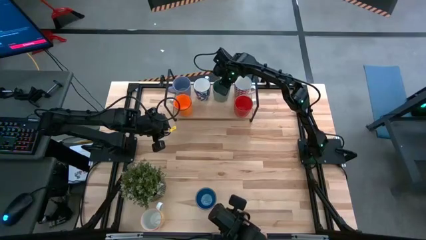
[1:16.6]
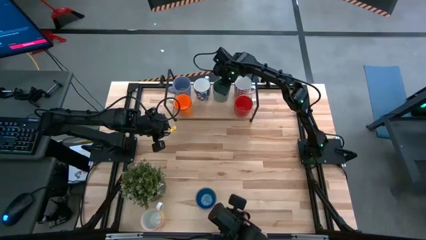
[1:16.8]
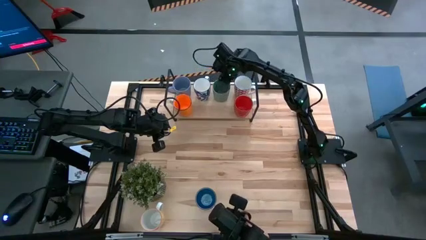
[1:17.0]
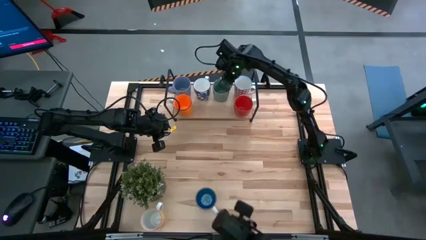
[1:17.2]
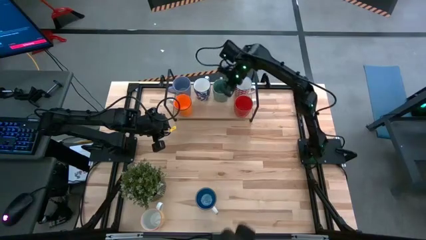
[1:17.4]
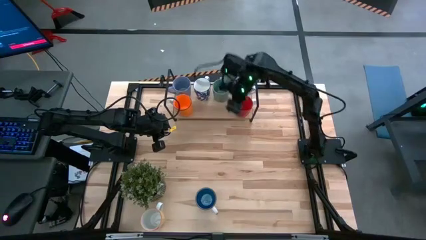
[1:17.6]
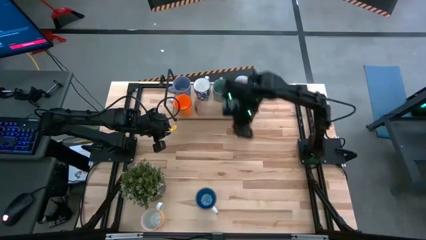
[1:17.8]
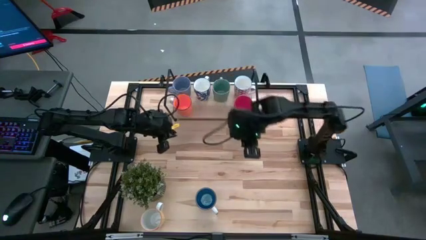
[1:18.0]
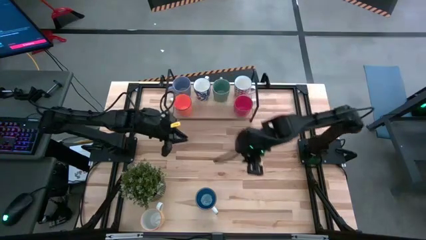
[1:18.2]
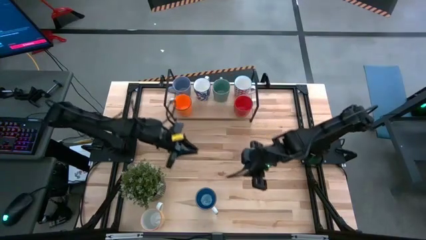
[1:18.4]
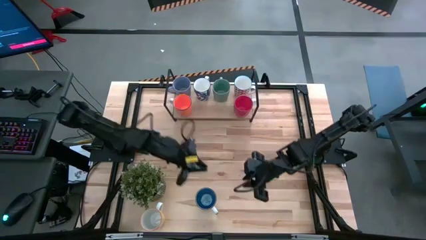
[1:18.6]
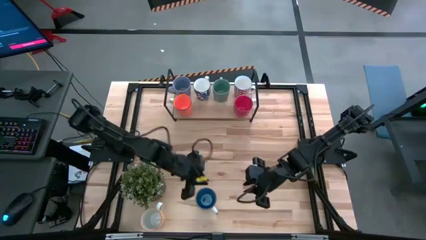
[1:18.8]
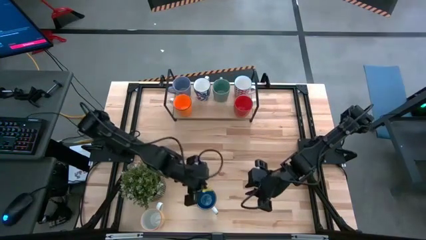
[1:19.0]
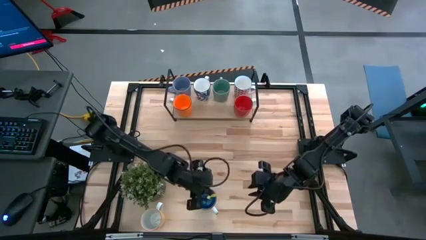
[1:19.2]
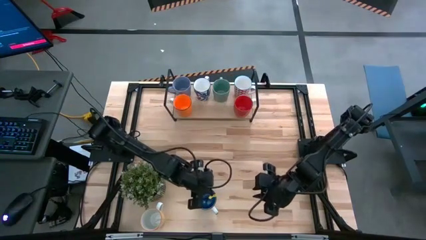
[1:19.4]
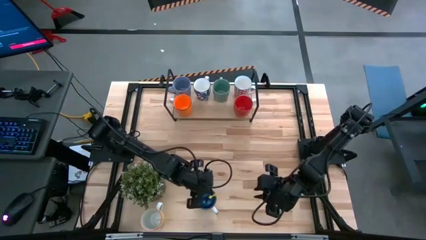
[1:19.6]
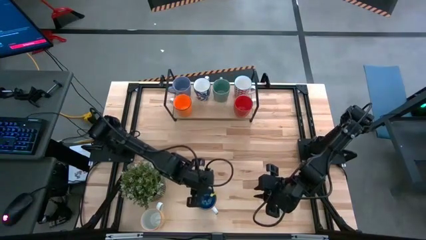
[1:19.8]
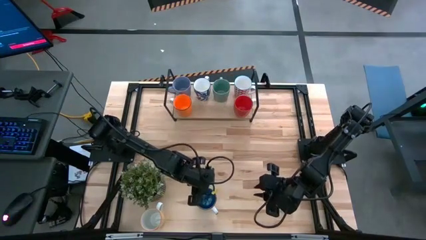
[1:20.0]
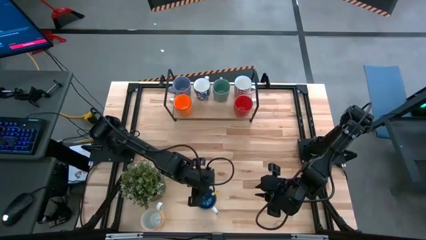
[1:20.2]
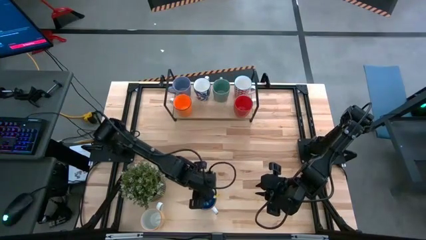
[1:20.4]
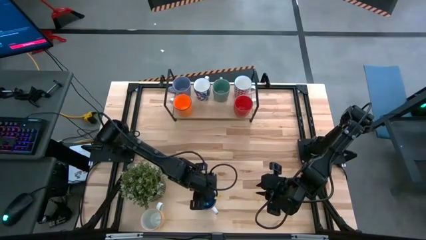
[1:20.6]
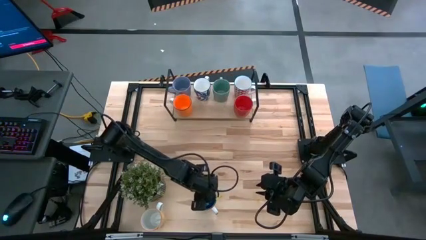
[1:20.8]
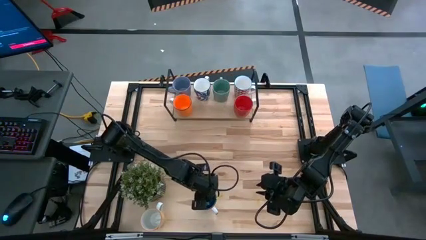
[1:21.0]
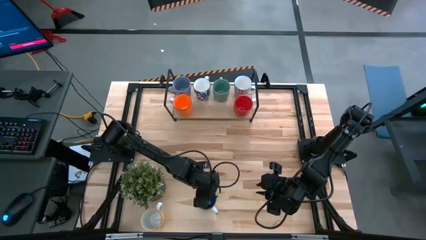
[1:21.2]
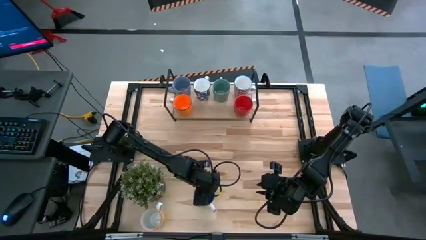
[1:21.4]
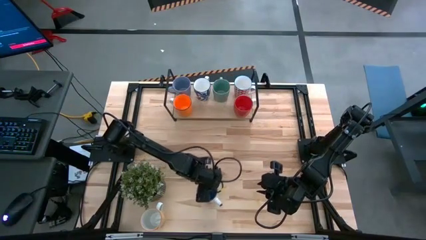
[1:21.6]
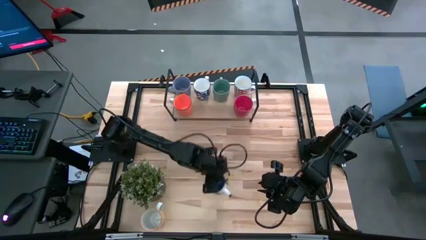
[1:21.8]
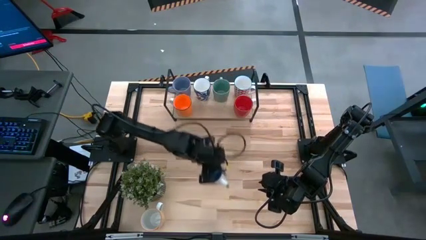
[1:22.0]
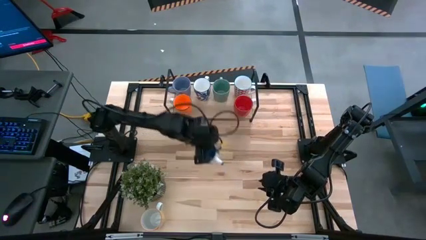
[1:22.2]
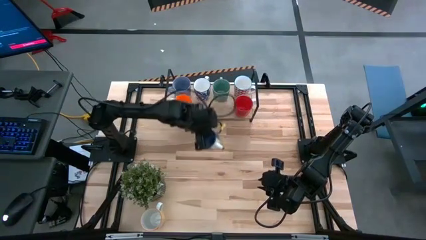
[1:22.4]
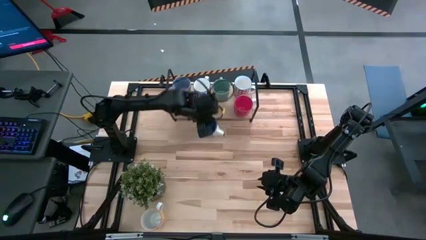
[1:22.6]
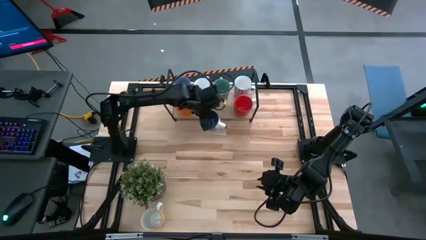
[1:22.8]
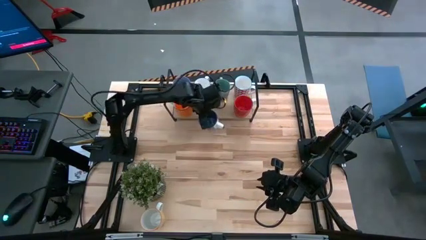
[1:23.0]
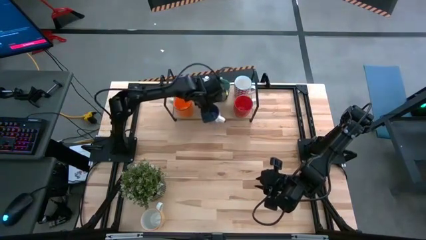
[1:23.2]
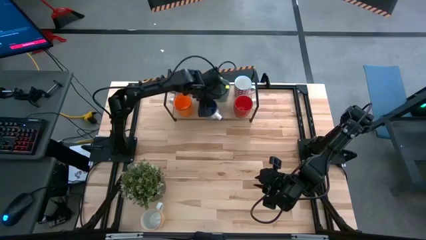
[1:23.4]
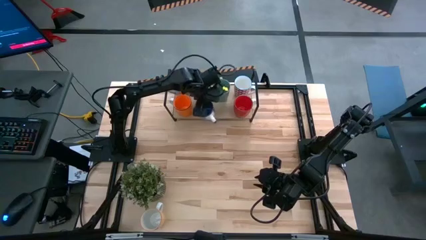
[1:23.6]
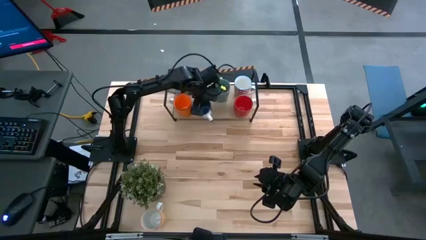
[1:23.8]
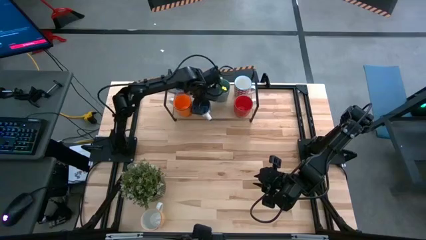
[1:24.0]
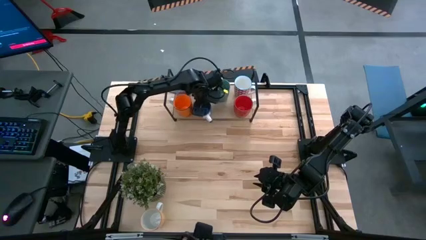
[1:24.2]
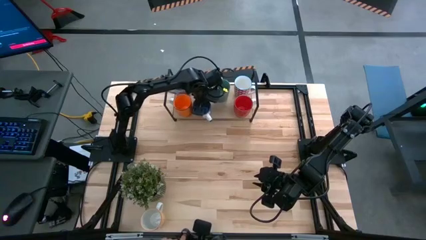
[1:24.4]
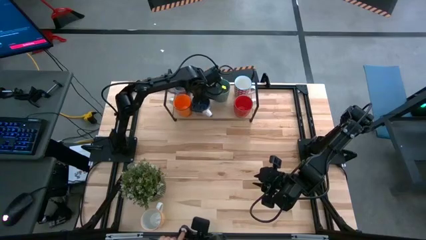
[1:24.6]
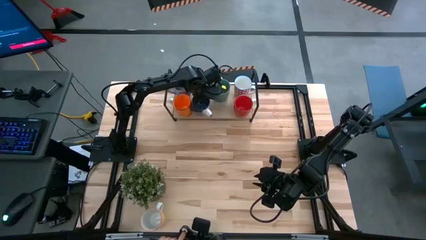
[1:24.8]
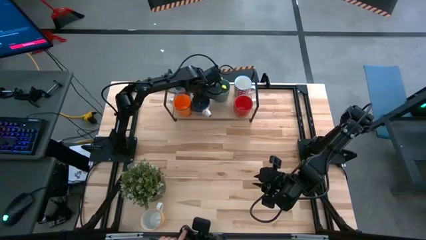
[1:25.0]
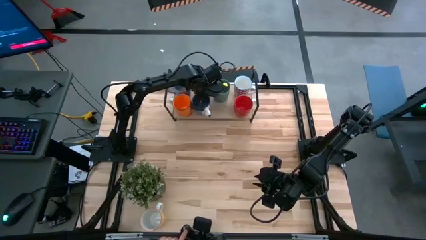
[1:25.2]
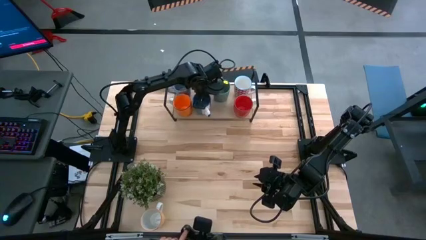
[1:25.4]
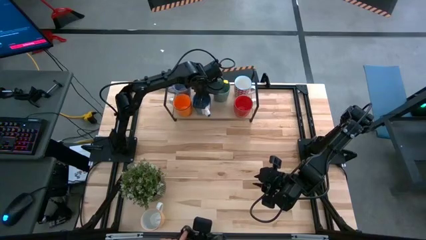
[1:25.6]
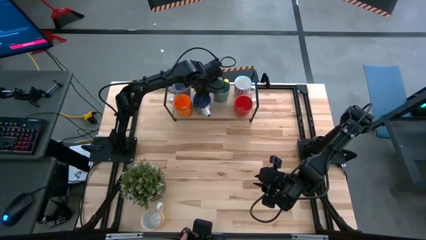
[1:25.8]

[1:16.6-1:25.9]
Task: Place coffee mugs
Put the dark blue mug on the shelf

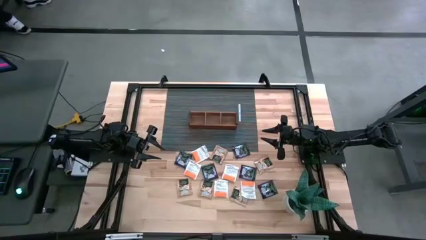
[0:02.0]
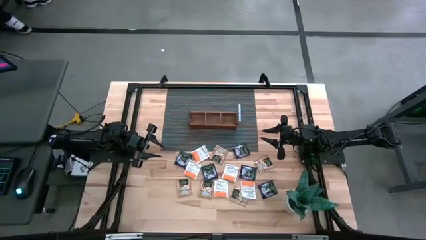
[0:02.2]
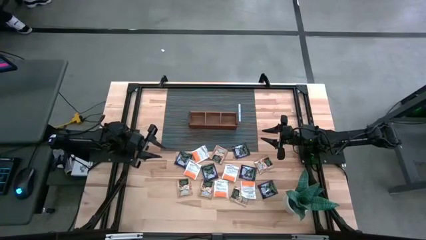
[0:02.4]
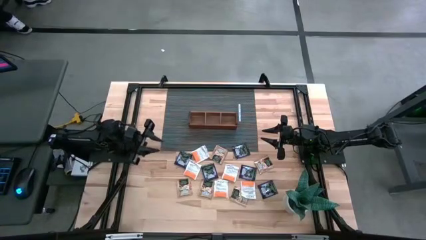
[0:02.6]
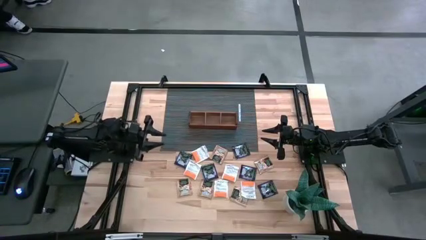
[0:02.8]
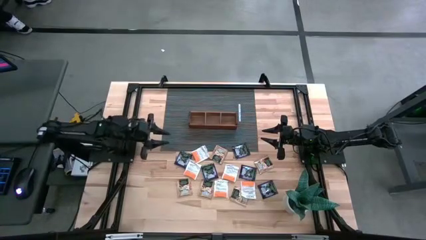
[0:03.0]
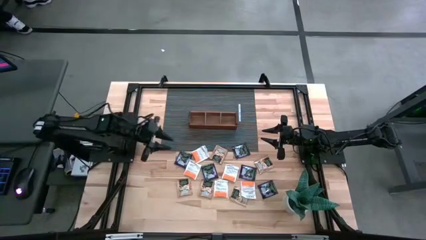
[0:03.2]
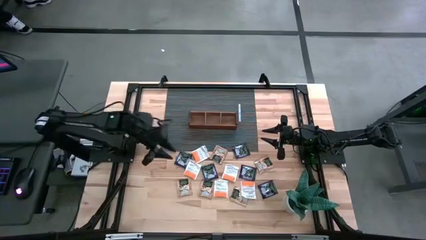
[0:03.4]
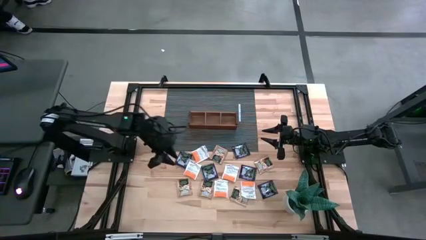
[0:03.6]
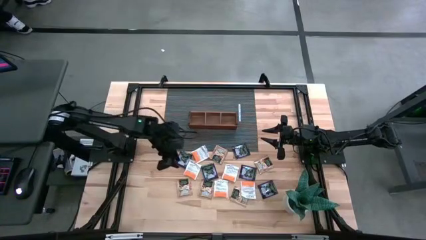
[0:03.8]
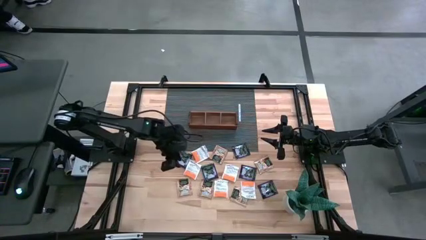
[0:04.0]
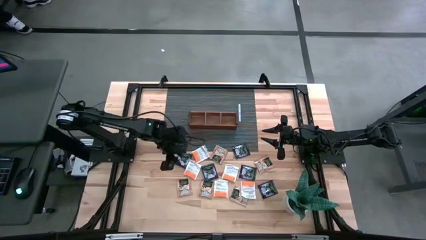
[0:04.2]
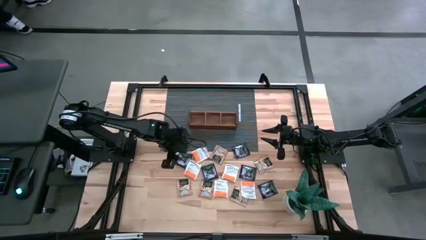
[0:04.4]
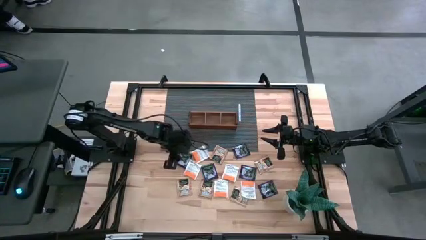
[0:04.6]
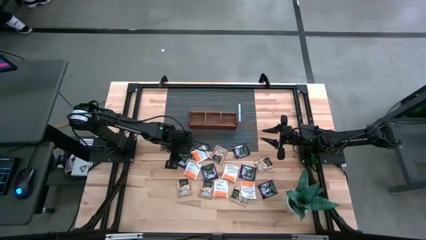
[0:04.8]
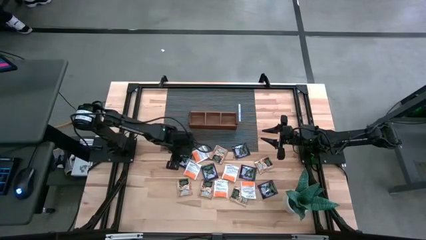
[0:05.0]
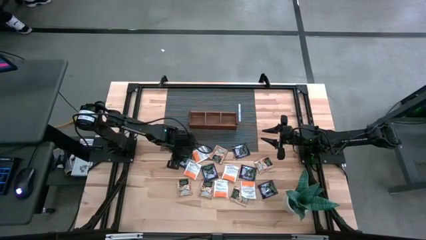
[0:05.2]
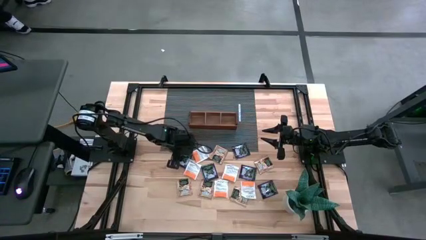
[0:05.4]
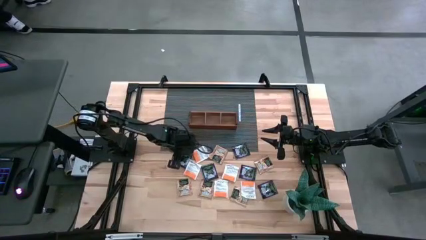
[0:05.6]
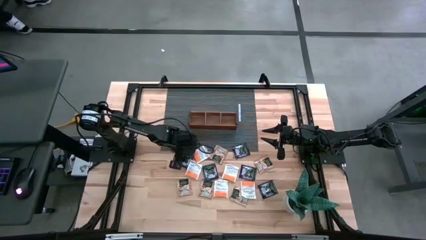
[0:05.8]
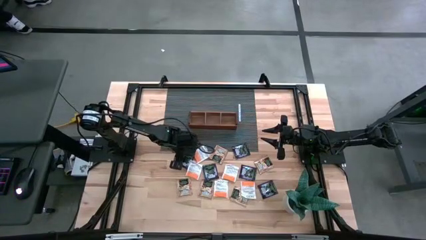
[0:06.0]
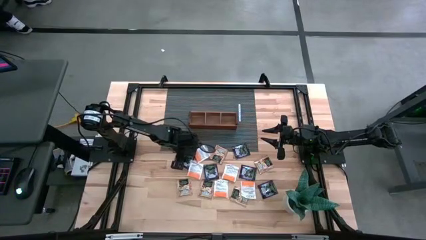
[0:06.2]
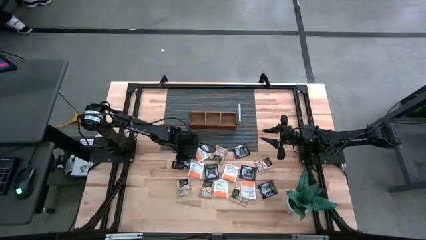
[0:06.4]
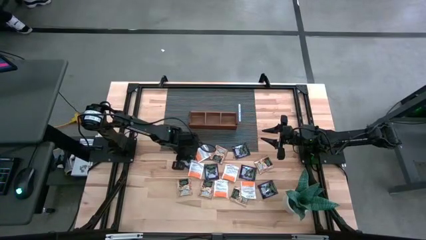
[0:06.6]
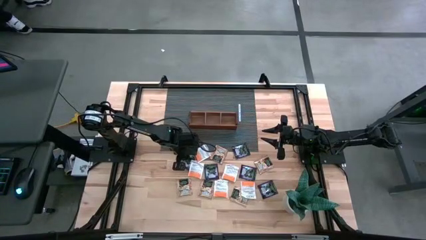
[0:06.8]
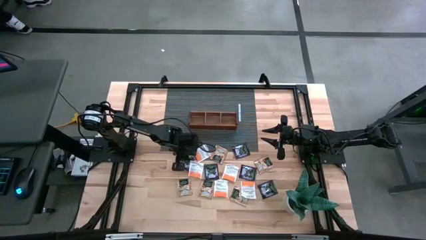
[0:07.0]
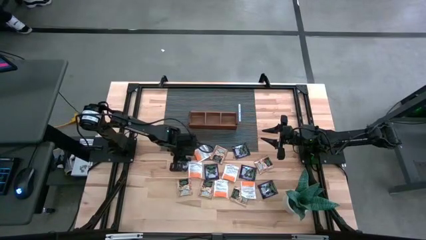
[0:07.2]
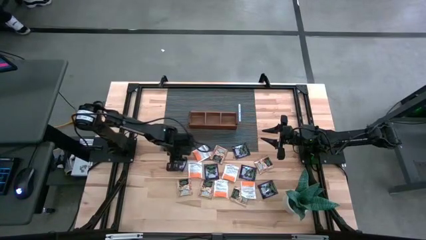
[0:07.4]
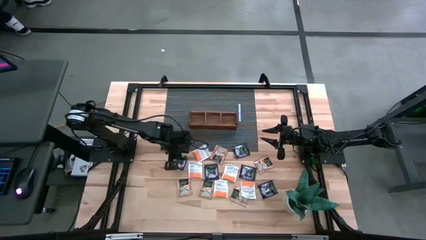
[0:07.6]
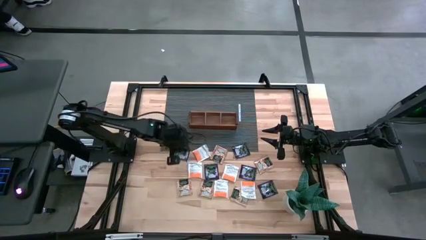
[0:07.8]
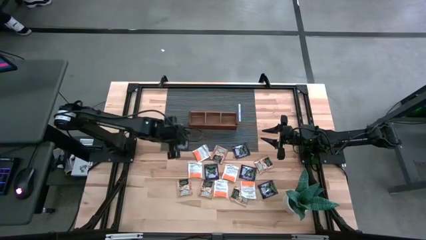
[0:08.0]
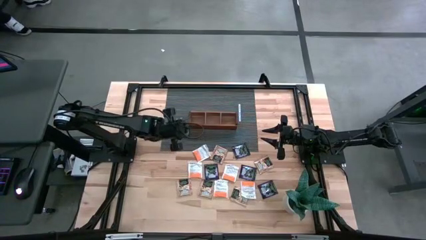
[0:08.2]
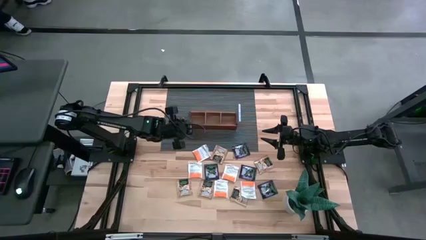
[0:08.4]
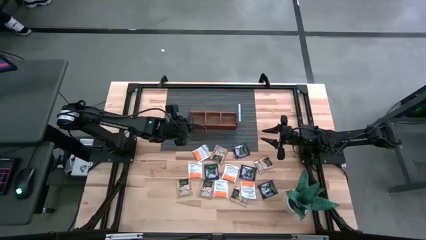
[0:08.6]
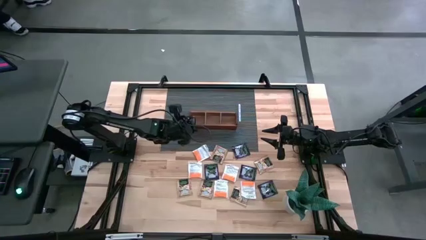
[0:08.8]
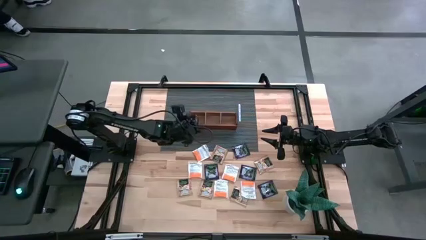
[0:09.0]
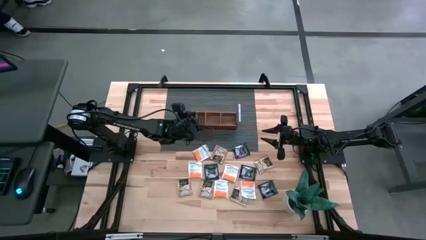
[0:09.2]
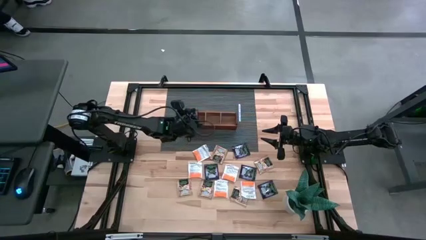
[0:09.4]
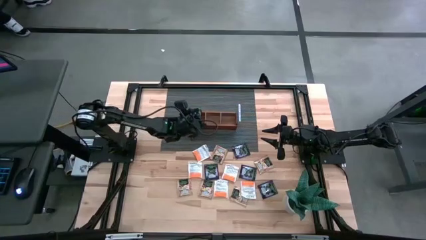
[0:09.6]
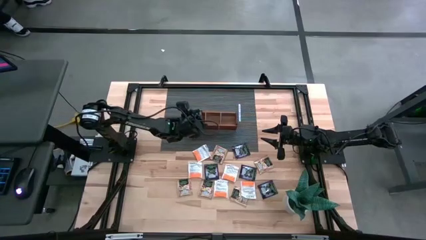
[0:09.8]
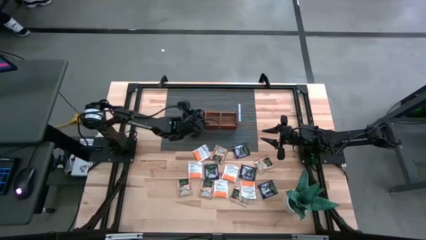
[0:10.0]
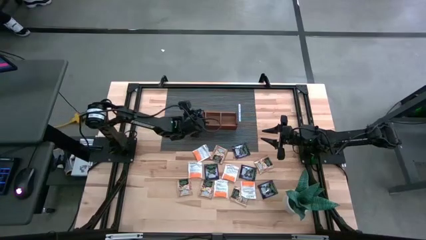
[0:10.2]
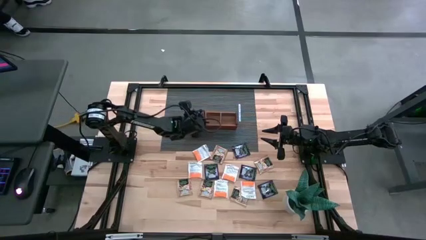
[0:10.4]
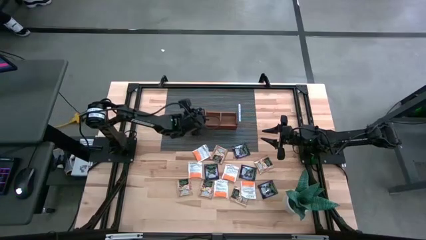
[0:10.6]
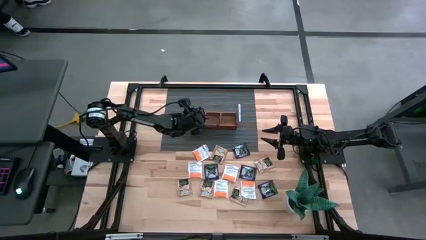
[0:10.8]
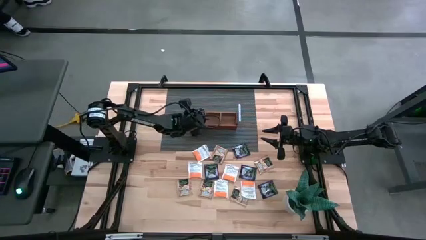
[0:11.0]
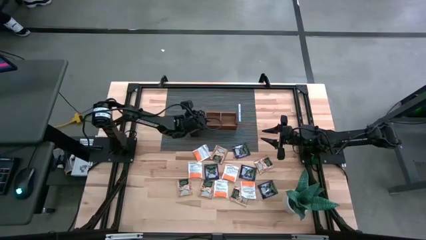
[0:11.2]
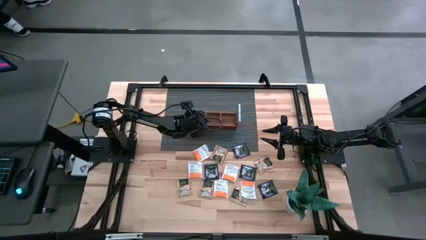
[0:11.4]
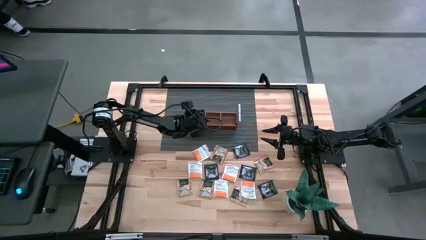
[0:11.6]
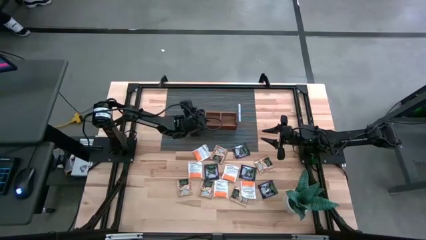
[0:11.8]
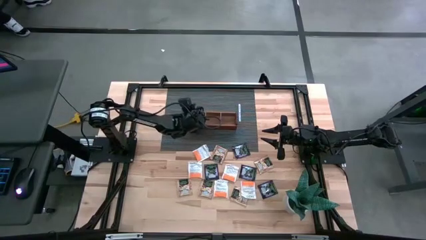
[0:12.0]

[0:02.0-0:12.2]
Task: Pick & Place Tea
Put the violet tea bag into the left section of the wooden organizer
